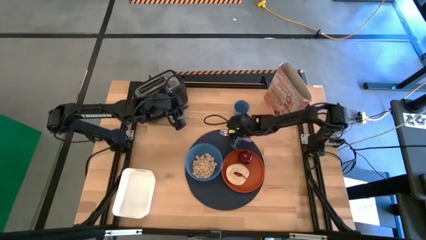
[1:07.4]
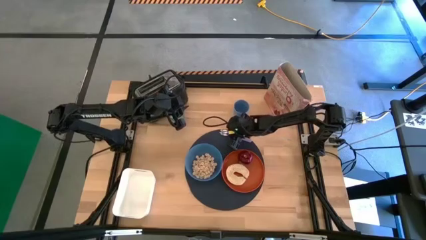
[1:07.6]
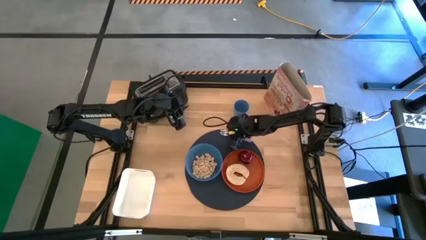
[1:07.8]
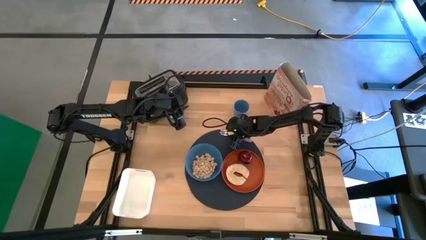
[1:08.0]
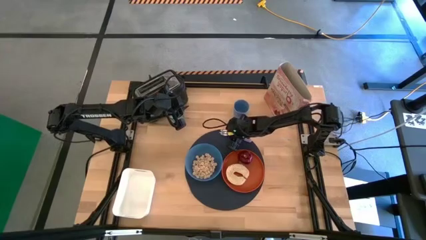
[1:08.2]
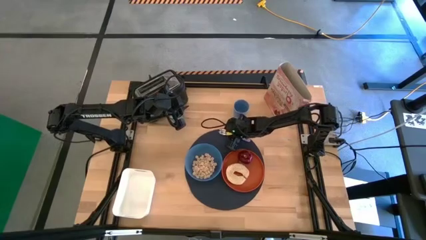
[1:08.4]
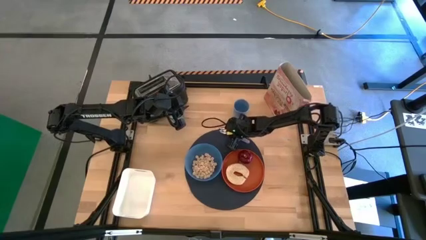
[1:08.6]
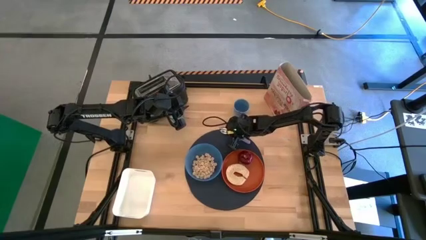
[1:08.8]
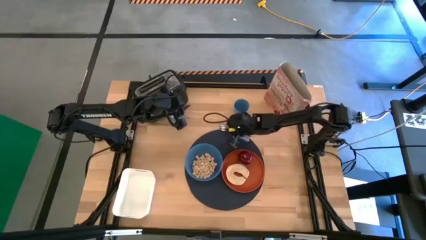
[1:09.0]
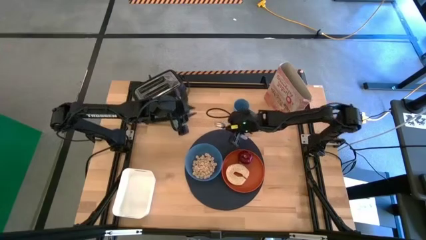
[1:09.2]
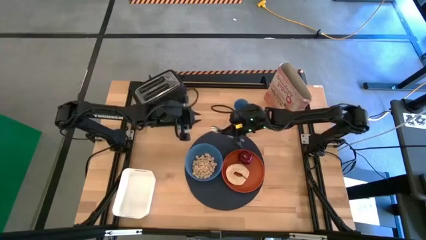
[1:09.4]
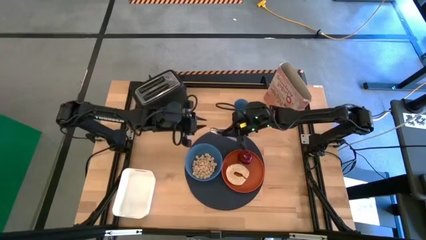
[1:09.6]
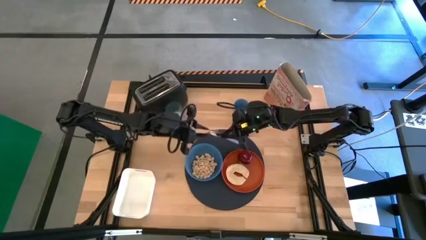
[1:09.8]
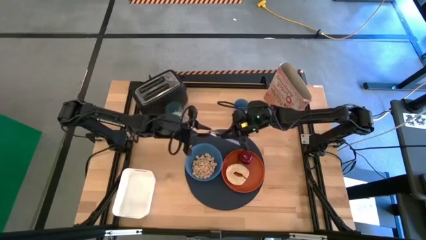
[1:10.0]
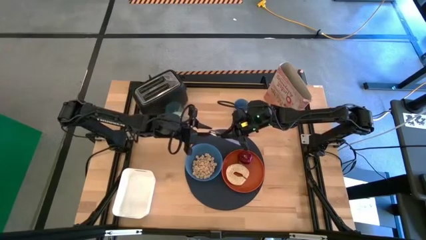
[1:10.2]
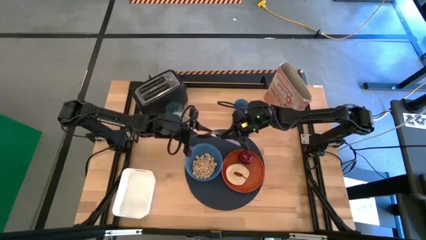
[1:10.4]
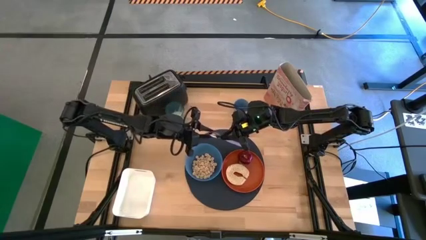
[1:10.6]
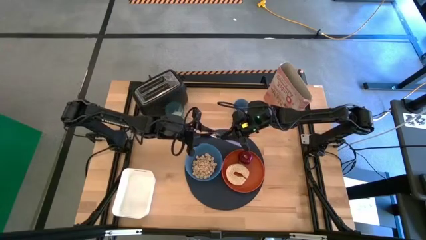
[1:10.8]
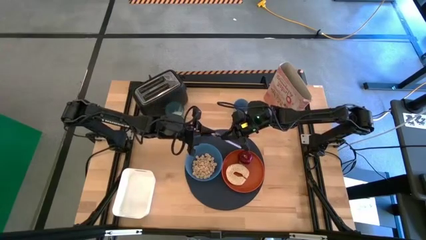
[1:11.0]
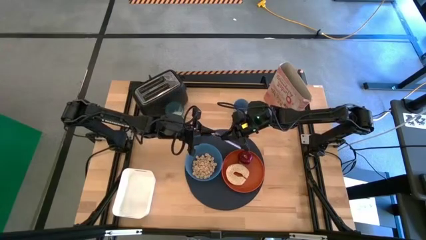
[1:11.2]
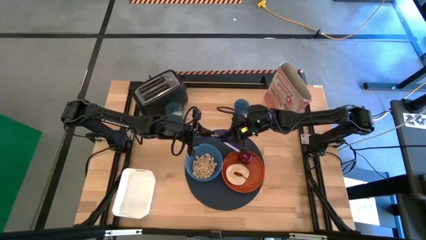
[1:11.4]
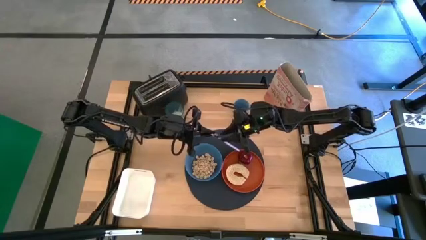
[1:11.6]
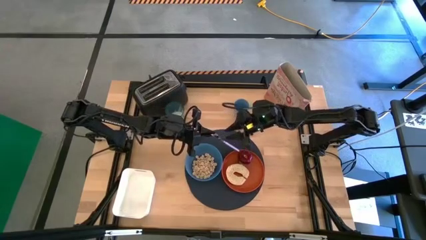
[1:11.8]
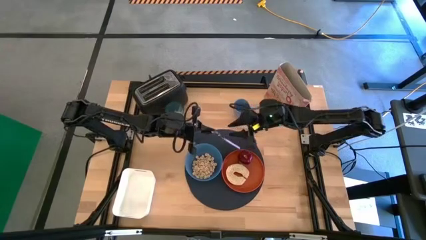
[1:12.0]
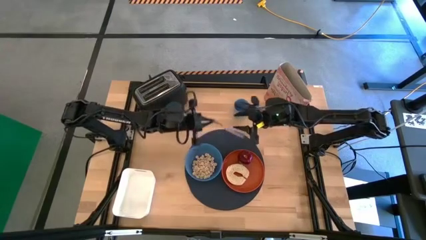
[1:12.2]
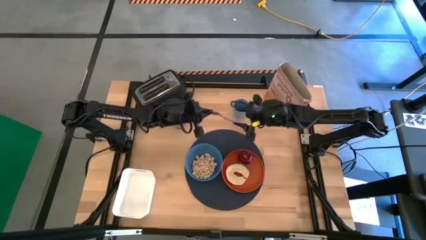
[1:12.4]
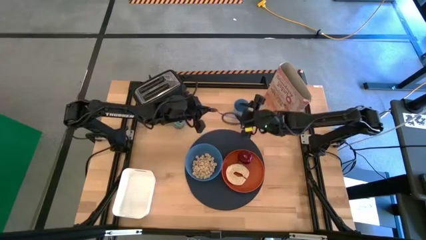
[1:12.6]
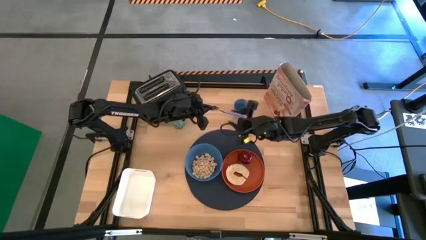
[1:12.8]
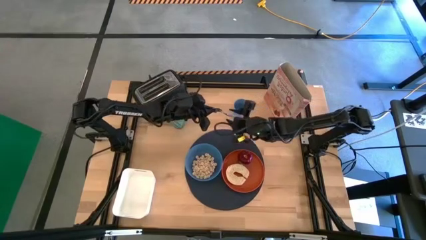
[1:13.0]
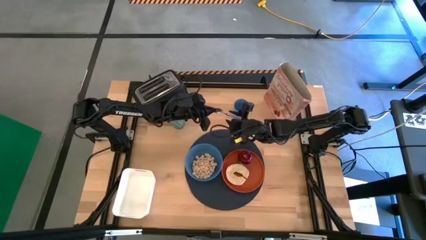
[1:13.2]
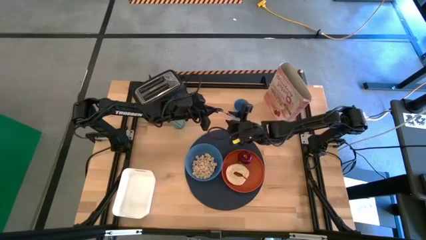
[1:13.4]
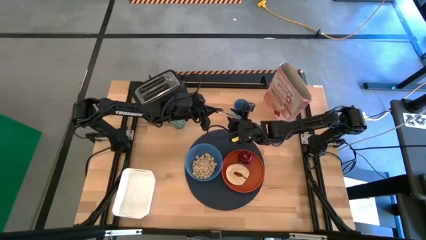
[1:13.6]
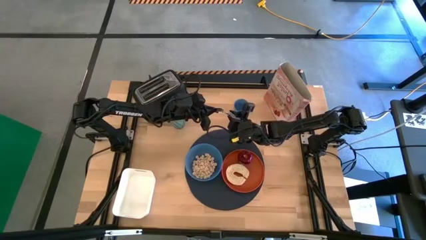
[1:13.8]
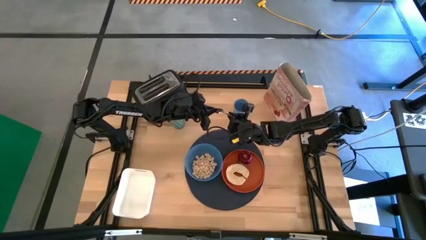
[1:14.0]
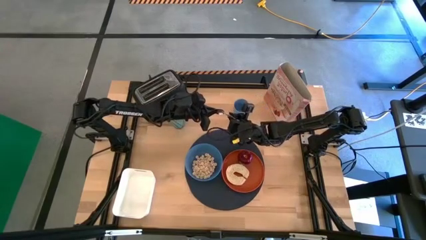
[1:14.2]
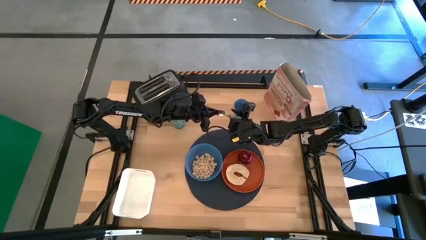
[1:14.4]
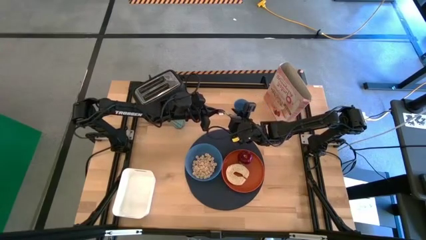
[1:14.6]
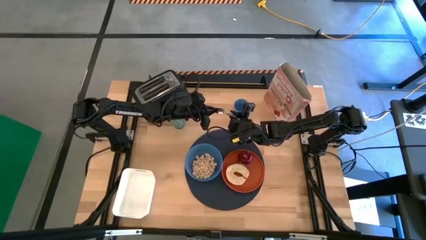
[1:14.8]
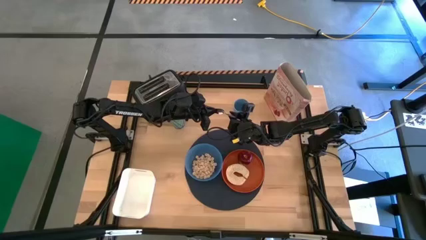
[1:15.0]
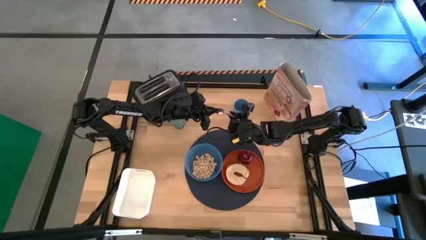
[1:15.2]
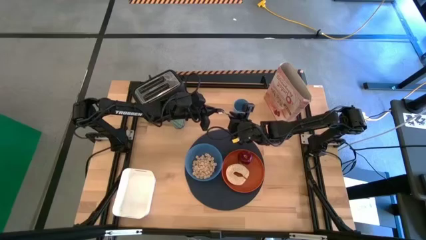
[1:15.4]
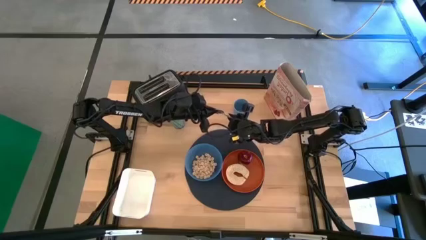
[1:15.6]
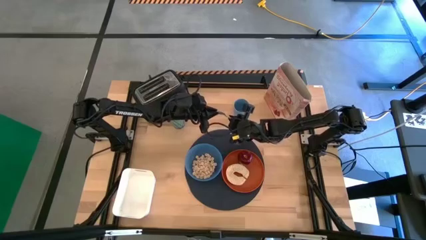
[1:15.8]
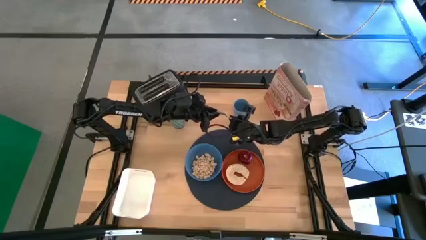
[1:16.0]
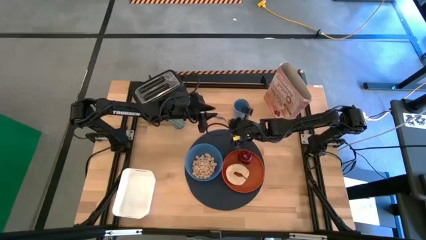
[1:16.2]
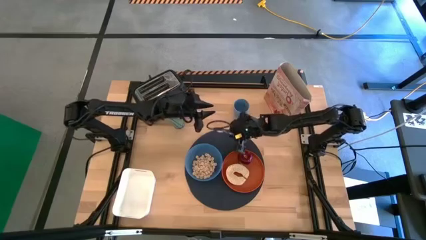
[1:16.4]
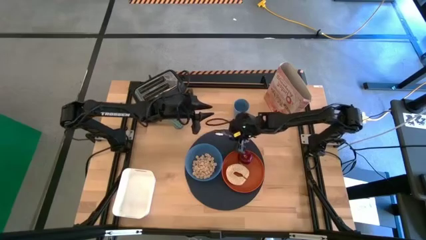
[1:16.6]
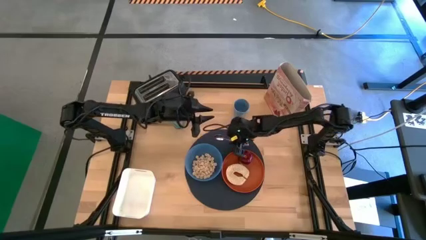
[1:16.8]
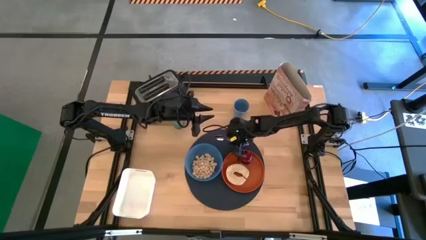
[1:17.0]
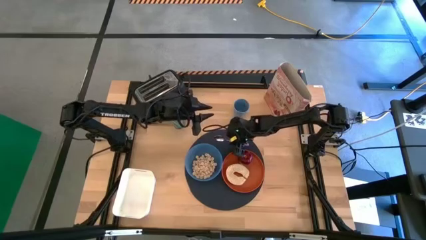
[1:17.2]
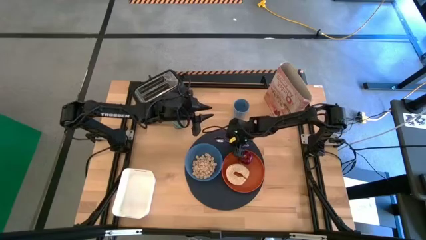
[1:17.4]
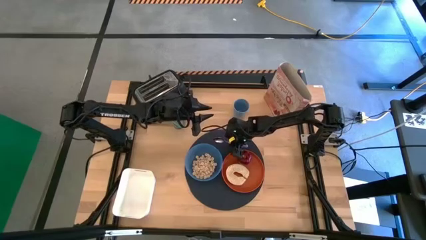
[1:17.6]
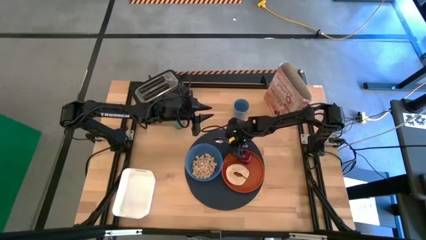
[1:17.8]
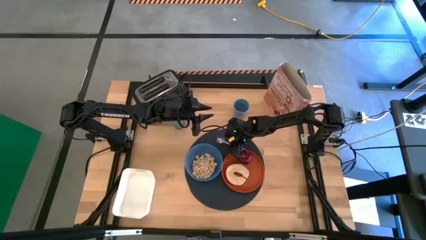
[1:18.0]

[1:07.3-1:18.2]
Task: Arrange a breakfast setting
Put the spoon on the placemat

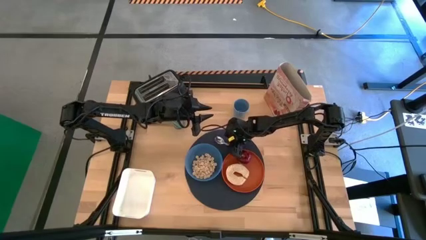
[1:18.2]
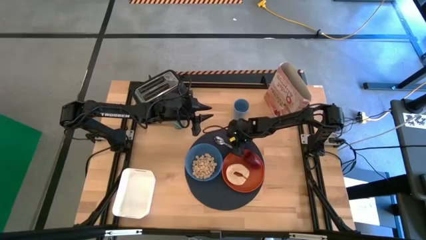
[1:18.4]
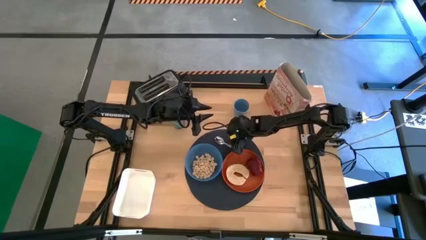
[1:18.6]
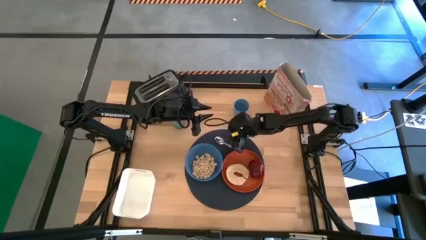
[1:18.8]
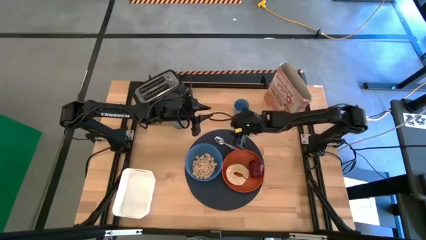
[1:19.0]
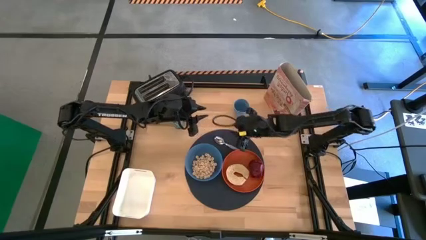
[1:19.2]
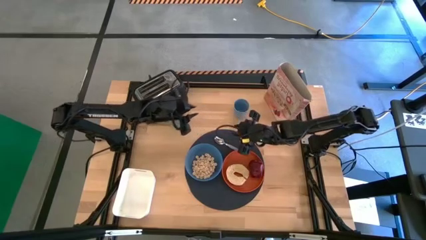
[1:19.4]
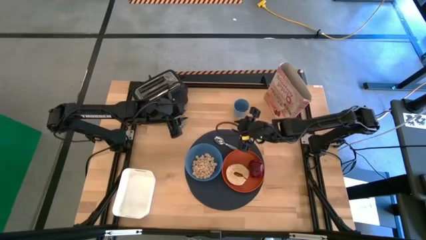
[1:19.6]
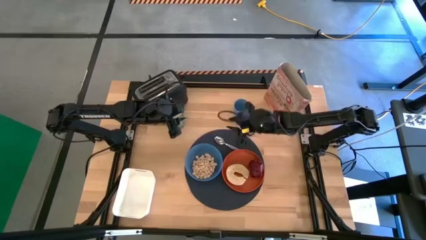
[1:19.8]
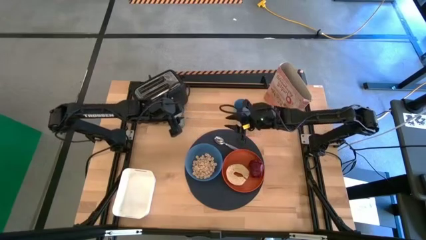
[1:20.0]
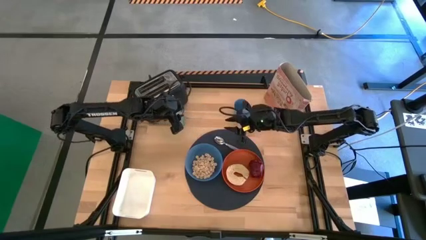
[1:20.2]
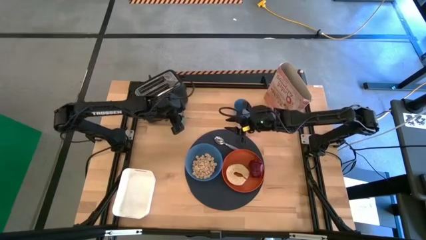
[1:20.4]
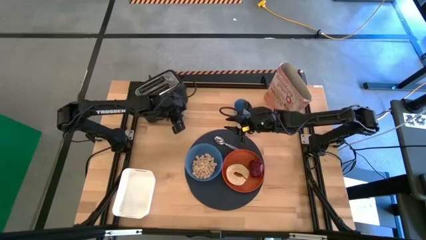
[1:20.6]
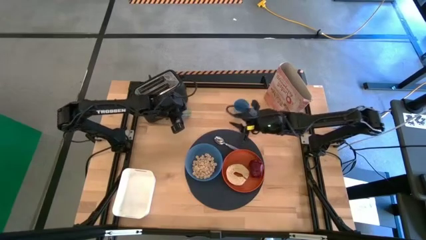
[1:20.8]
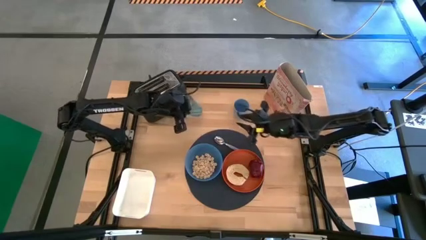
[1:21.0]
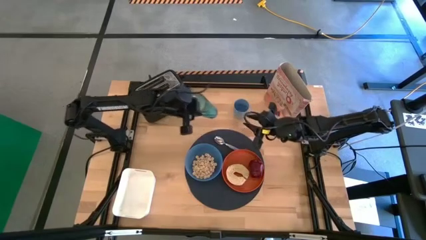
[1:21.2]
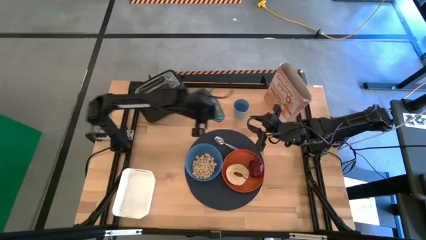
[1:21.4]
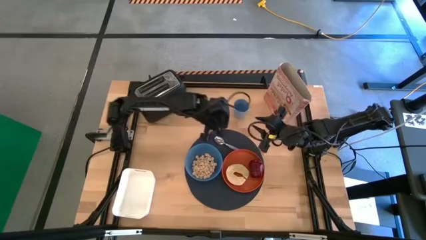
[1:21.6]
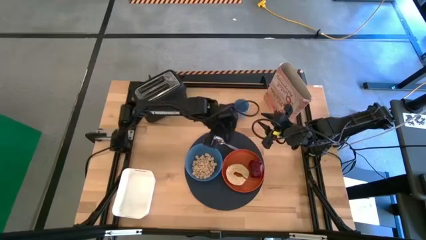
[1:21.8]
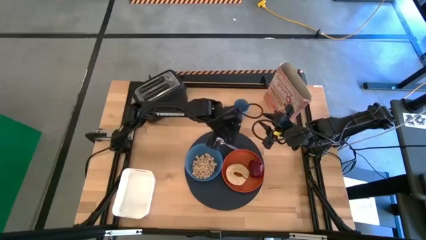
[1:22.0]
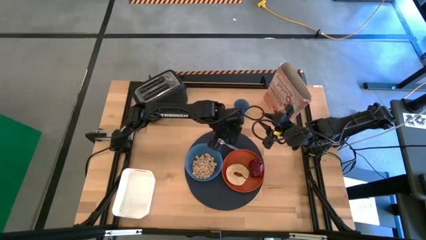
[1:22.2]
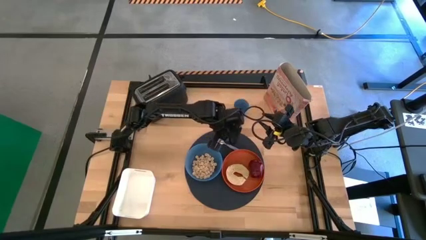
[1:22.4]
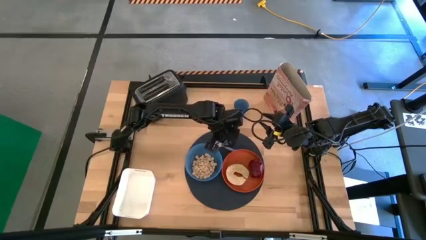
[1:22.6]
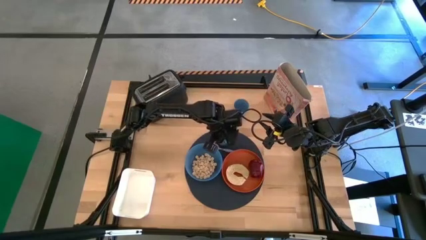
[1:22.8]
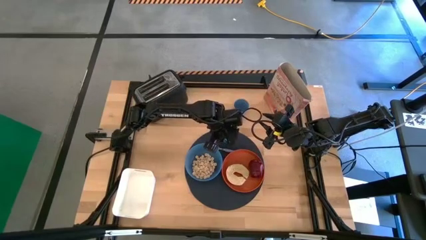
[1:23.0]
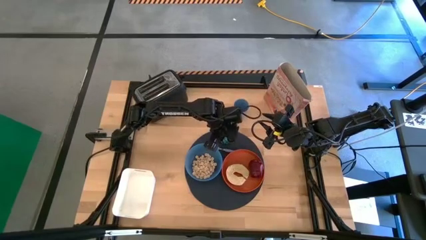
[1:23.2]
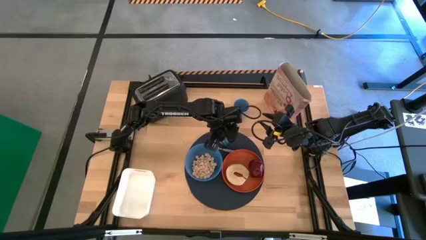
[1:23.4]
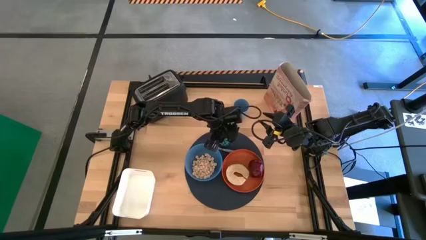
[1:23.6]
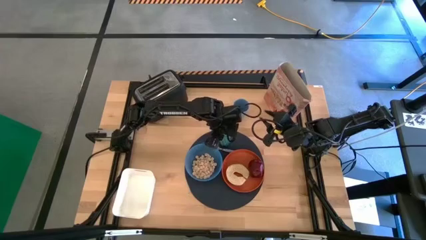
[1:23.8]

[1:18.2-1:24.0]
Put the cup of milk on the placemat
